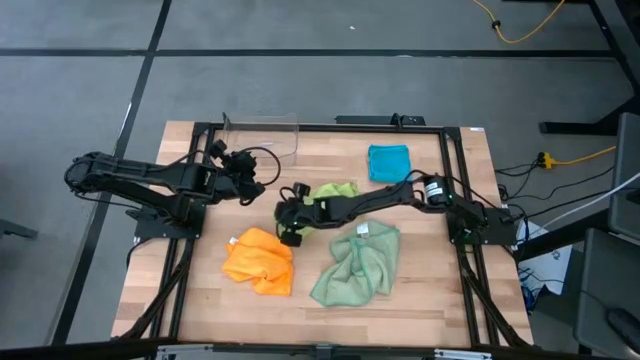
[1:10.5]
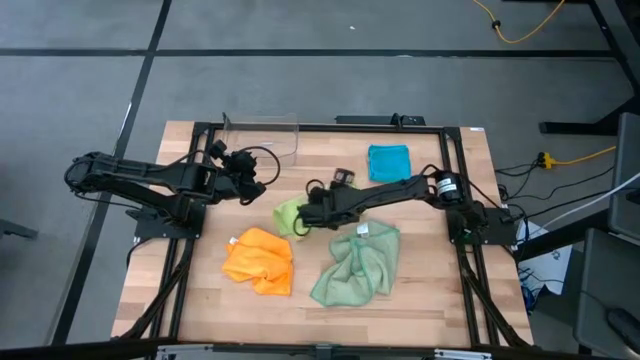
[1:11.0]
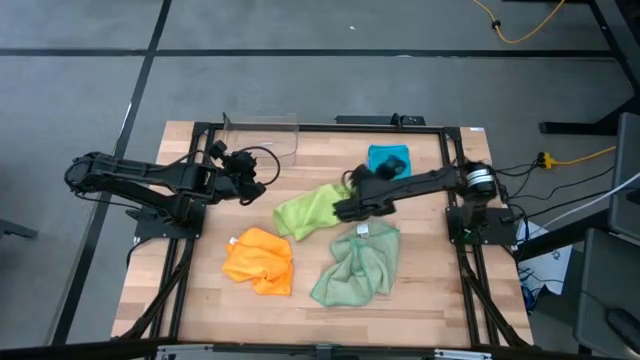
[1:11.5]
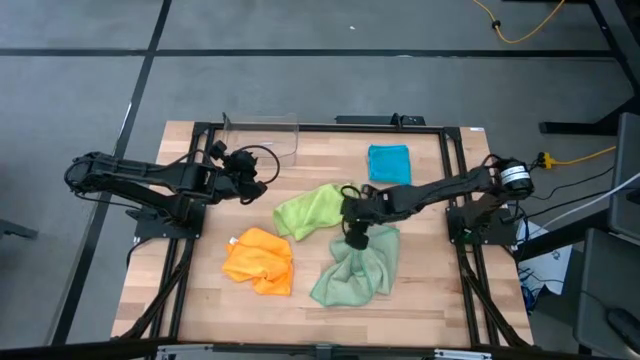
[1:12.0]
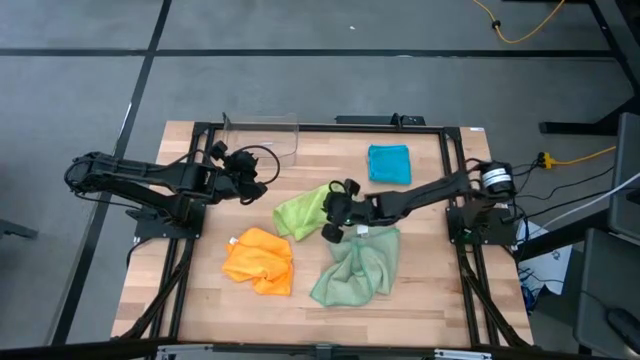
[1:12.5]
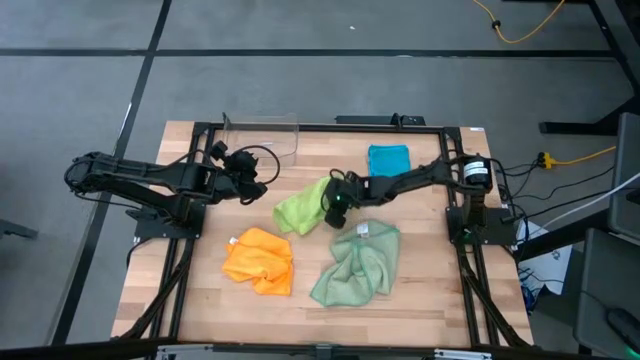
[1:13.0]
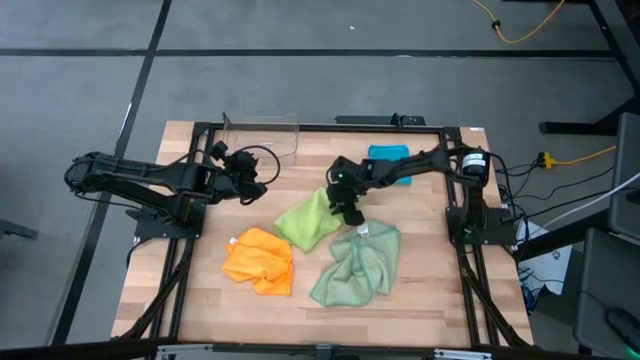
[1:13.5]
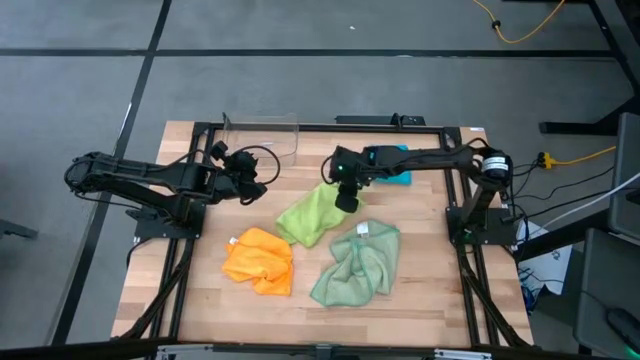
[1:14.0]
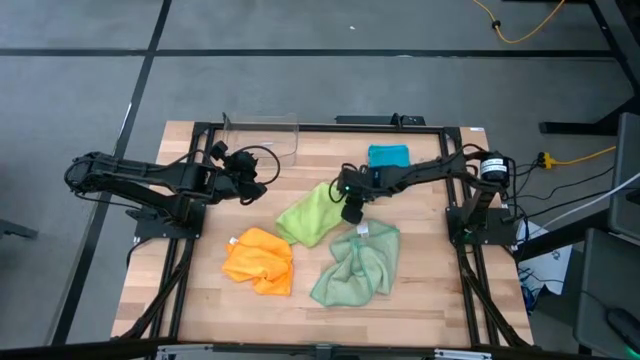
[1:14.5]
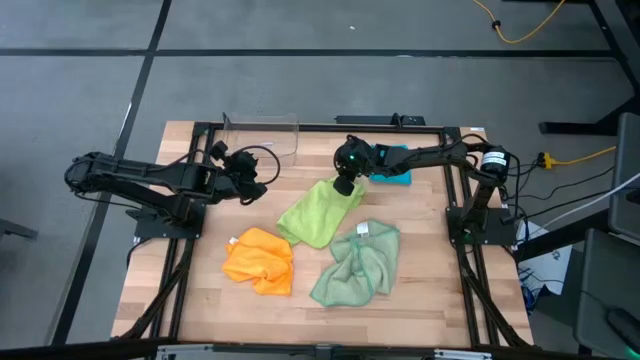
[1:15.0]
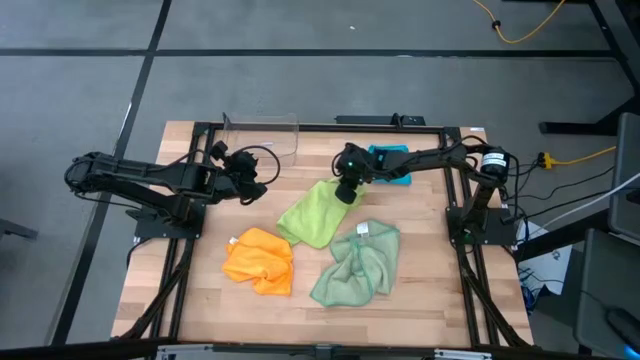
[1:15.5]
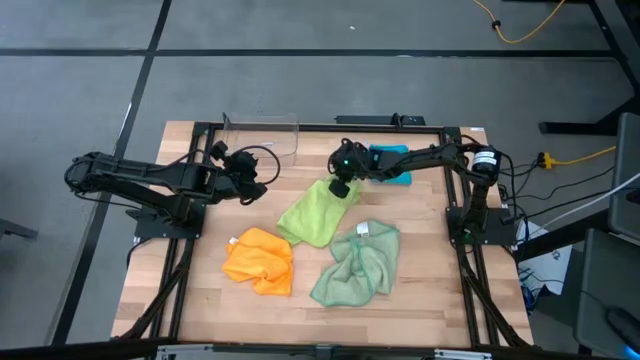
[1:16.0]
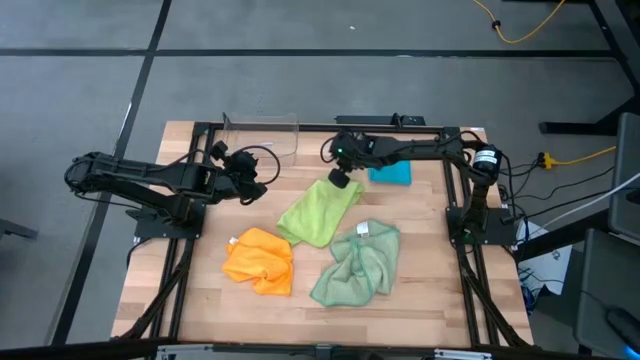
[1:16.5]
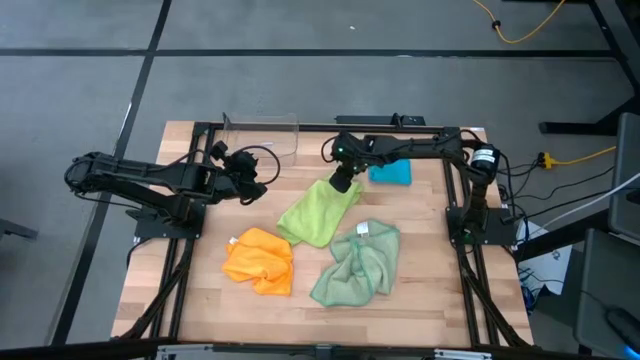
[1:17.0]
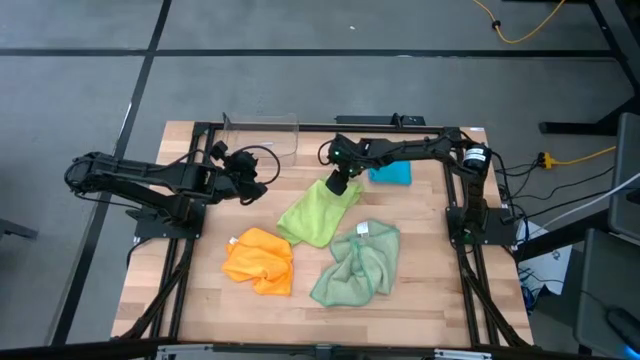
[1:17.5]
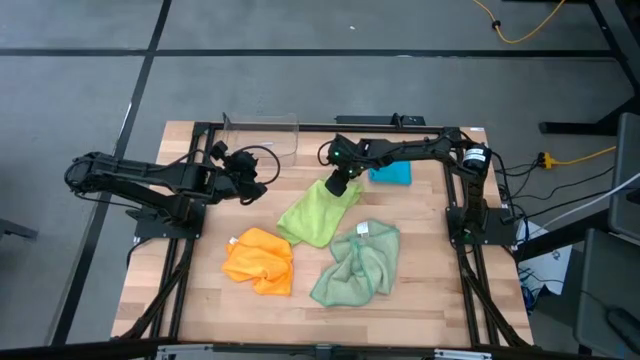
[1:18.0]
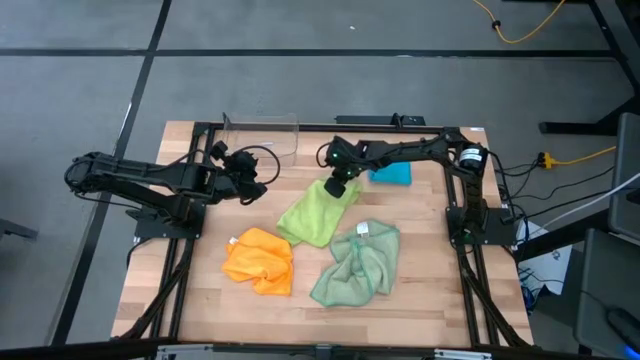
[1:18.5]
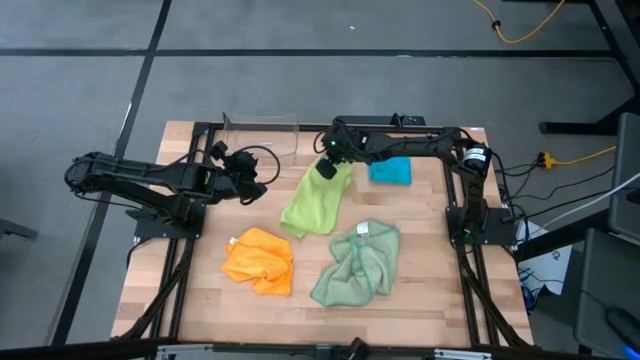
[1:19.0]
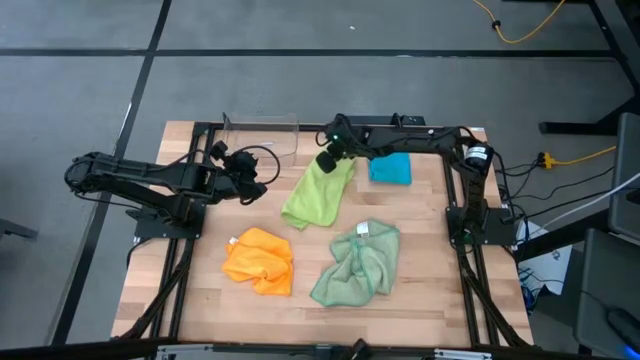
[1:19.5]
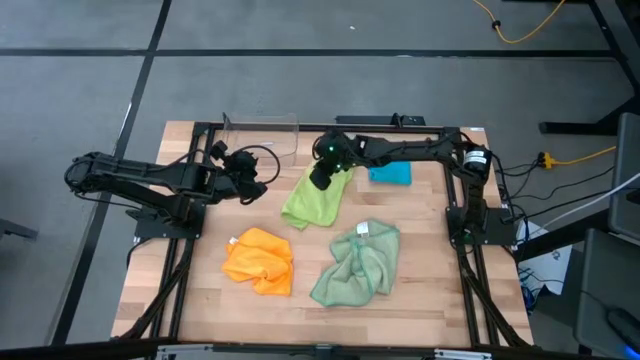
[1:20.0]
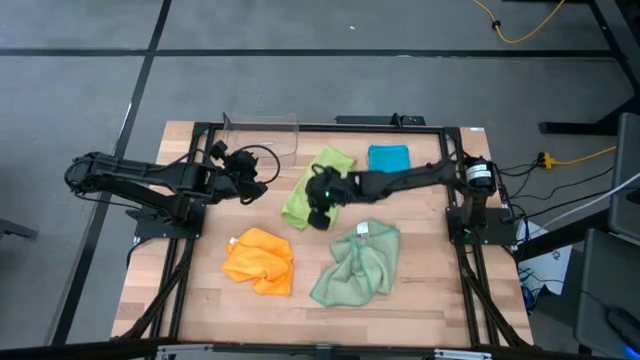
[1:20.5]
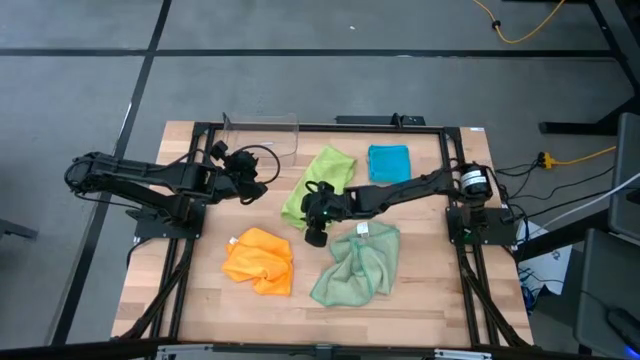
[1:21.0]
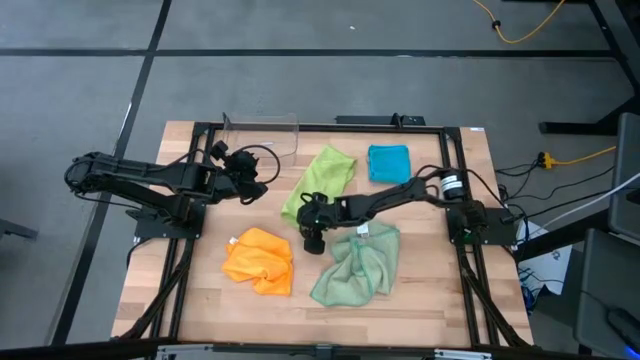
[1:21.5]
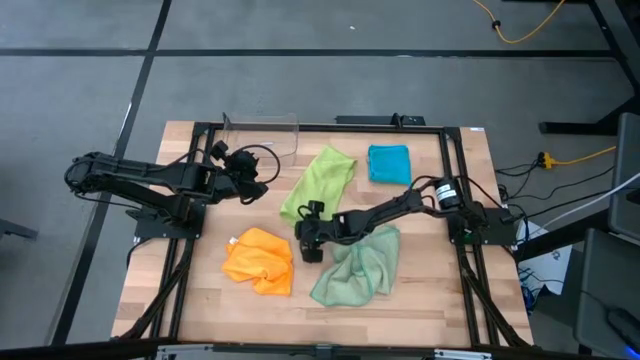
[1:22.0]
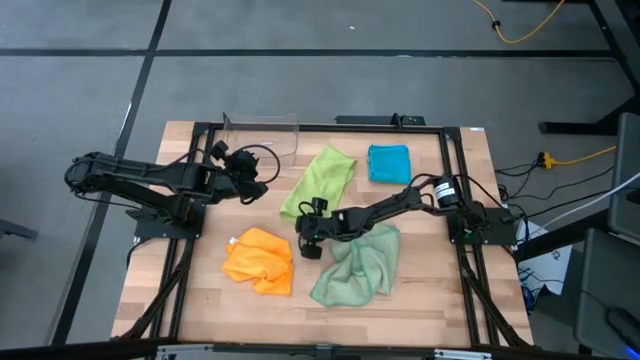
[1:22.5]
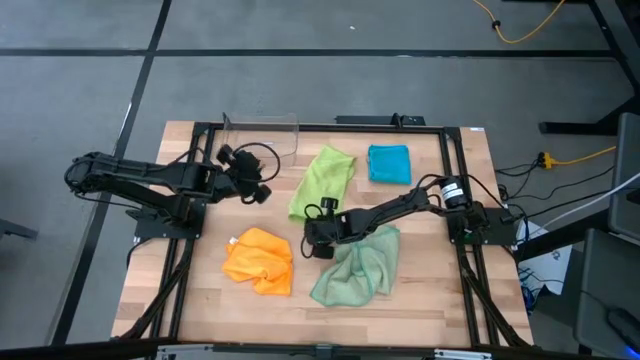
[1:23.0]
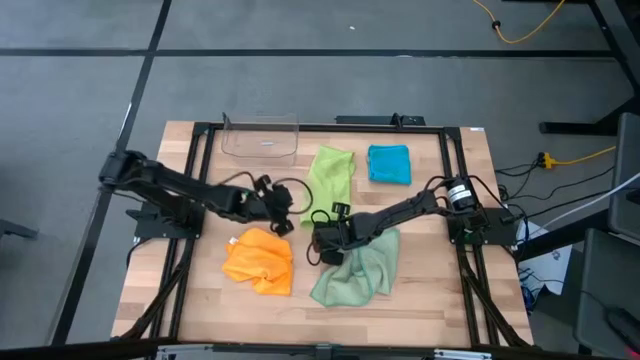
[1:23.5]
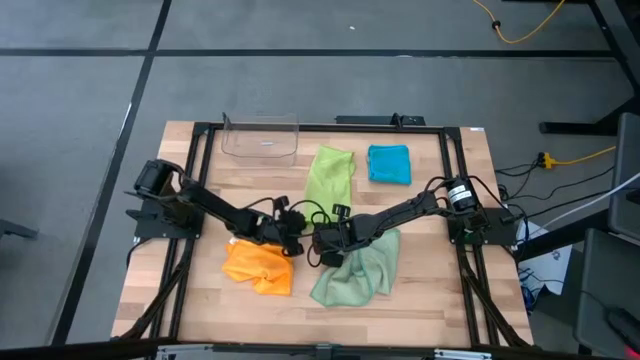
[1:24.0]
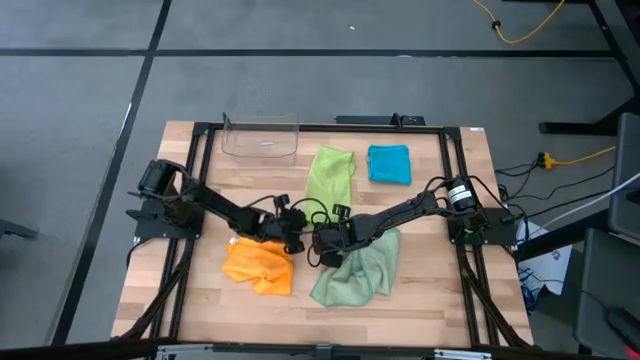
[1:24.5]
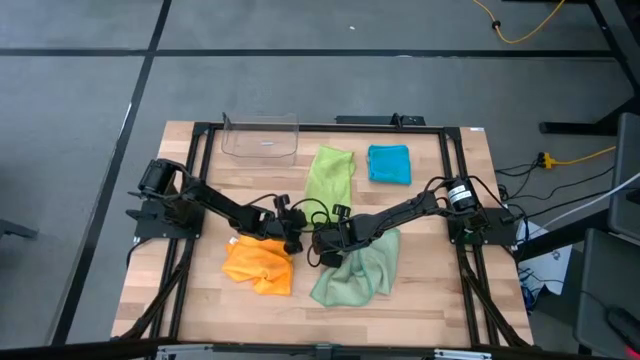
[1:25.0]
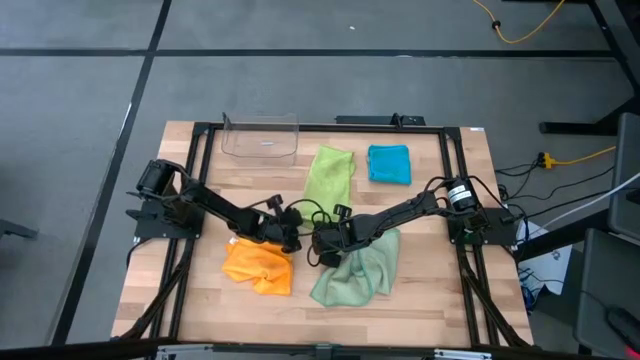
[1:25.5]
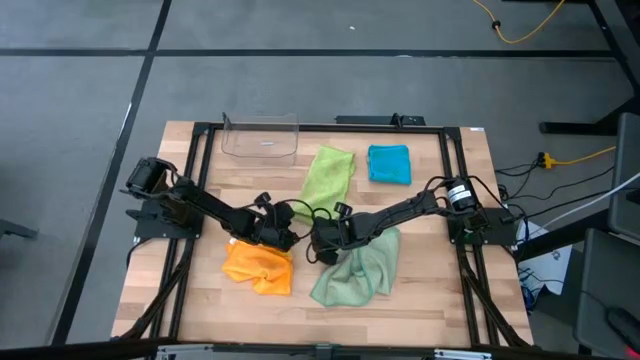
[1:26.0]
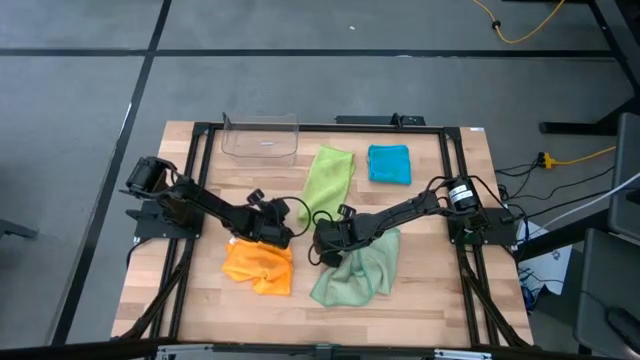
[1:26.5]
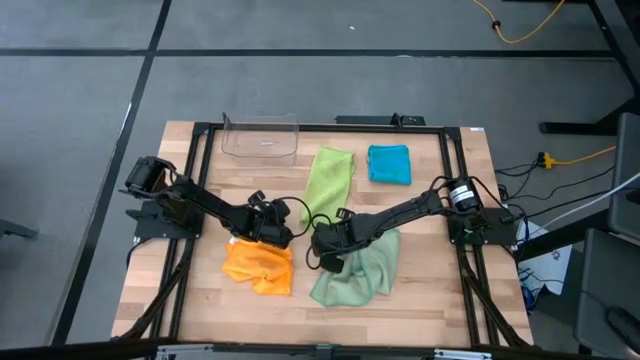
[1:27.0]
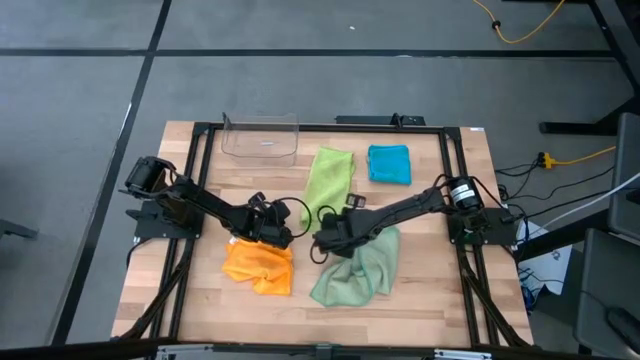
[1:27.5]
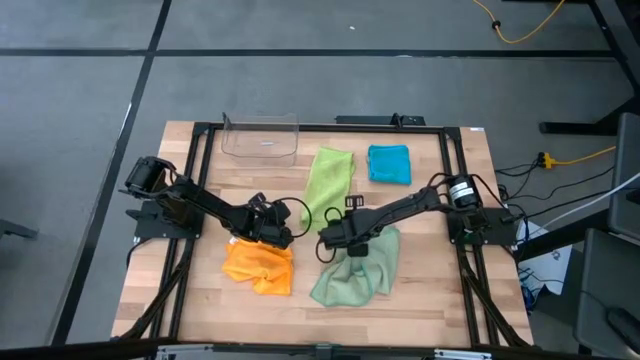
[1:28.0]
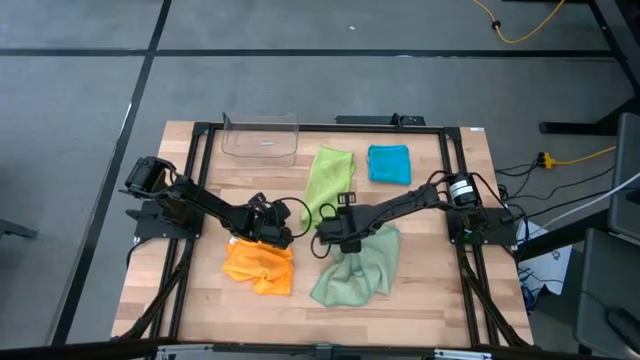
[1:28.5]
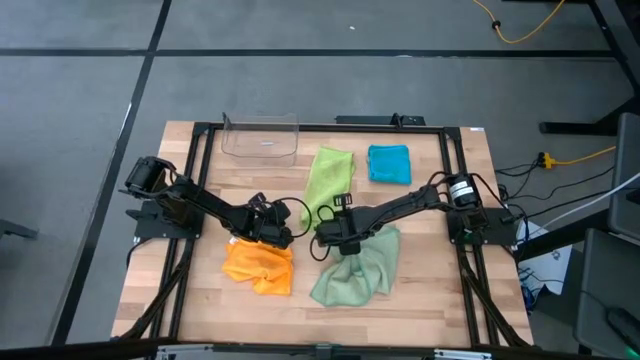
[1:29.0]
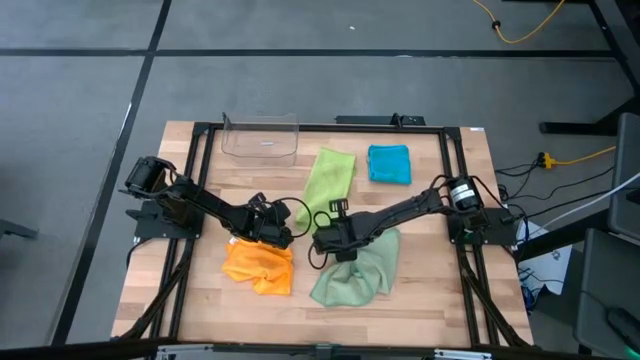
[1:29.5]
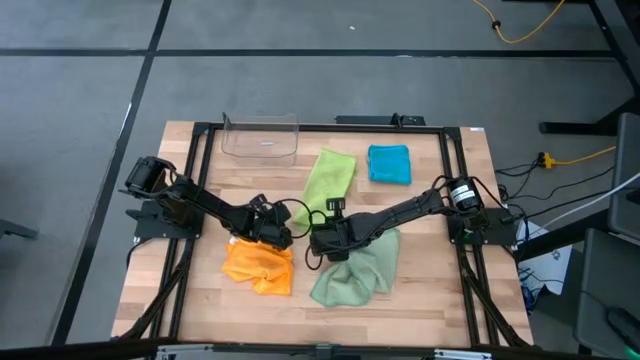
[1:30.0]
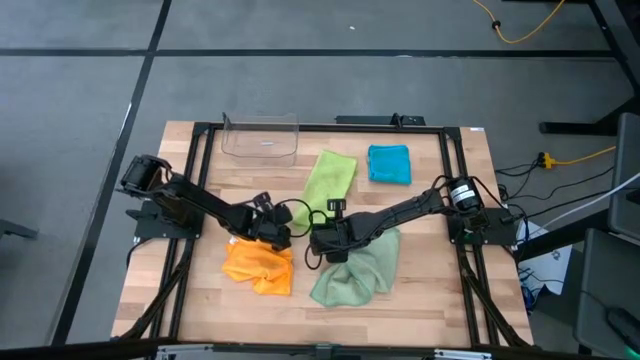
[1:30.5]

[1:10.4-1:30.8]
Task: Fold microfiber towels
Fold the light green towel
